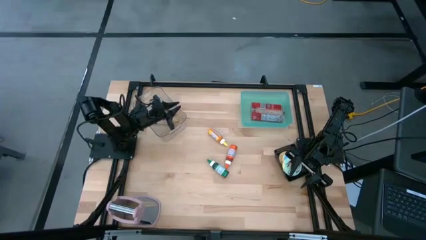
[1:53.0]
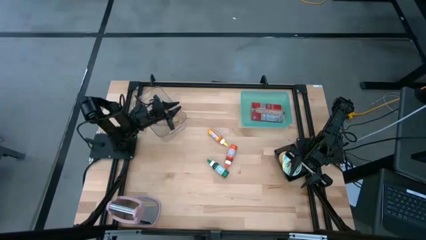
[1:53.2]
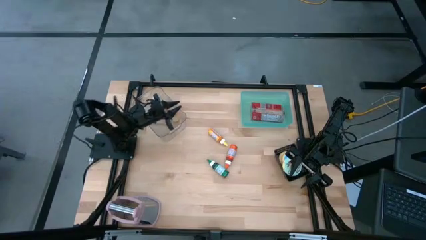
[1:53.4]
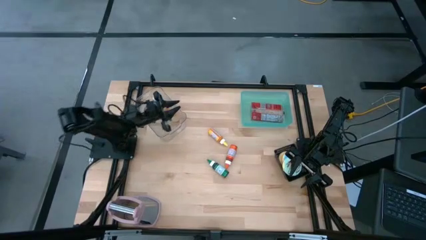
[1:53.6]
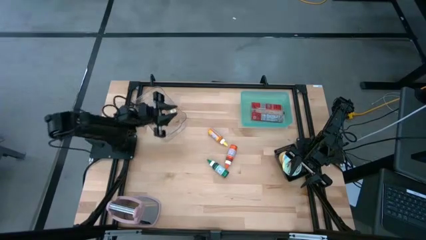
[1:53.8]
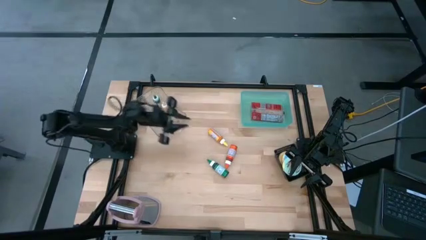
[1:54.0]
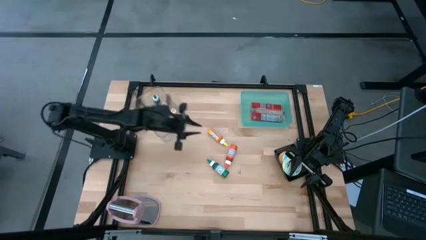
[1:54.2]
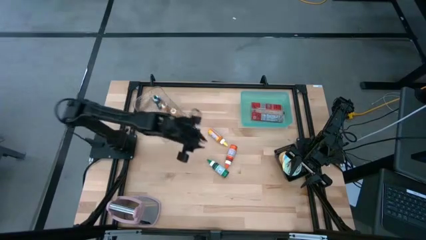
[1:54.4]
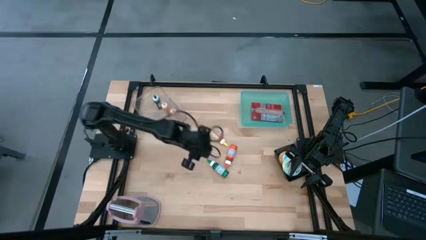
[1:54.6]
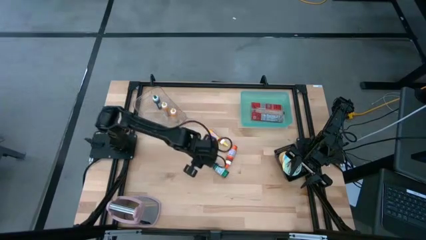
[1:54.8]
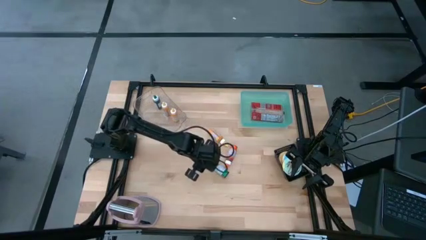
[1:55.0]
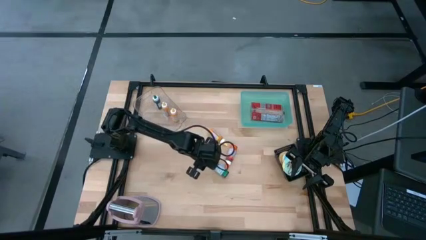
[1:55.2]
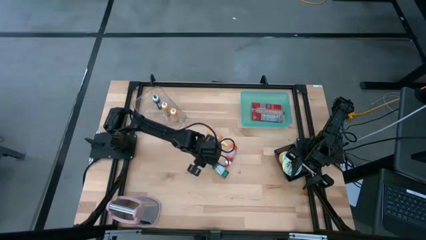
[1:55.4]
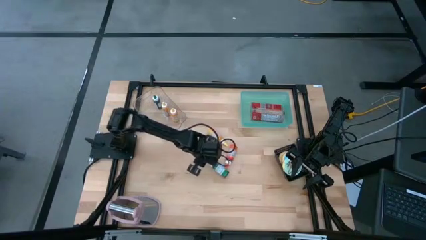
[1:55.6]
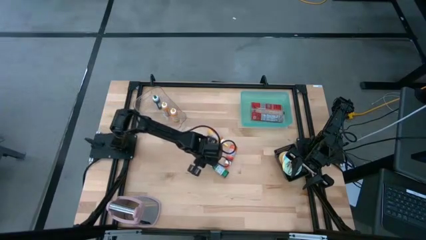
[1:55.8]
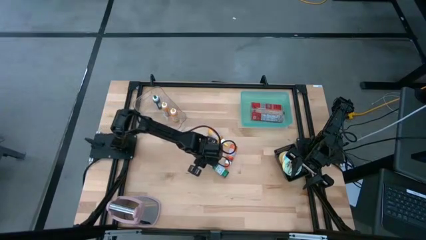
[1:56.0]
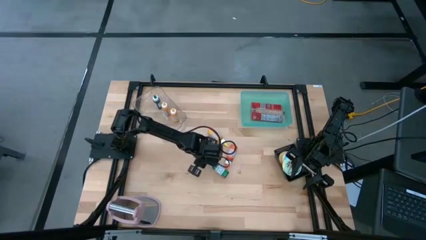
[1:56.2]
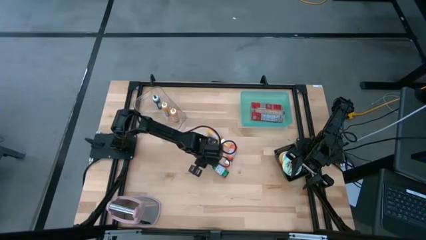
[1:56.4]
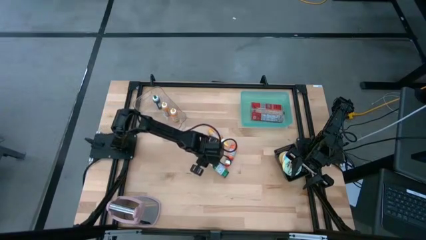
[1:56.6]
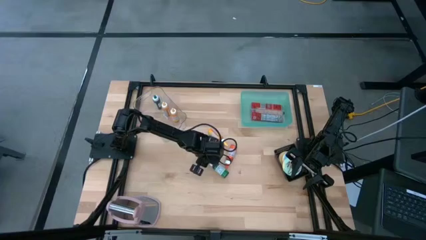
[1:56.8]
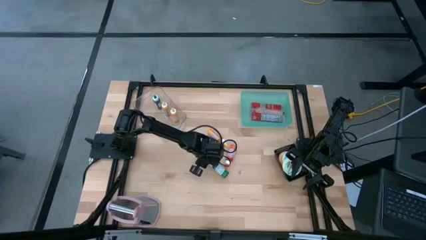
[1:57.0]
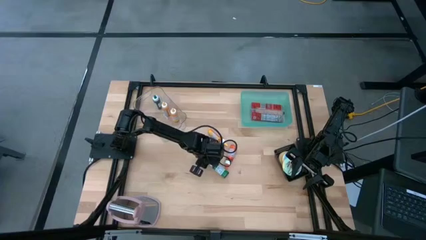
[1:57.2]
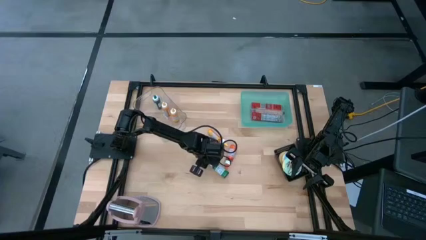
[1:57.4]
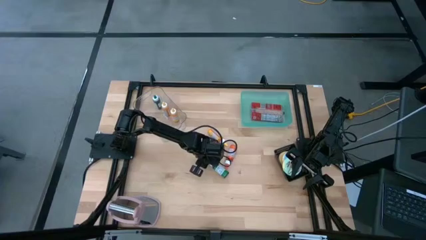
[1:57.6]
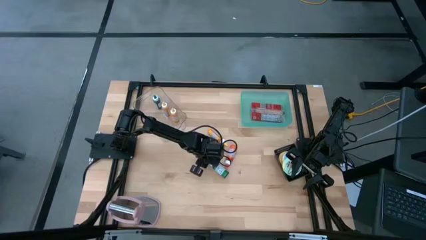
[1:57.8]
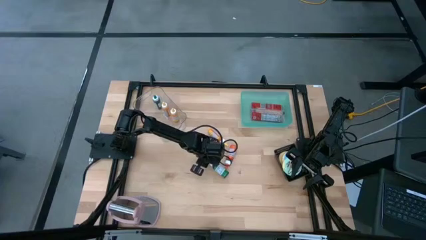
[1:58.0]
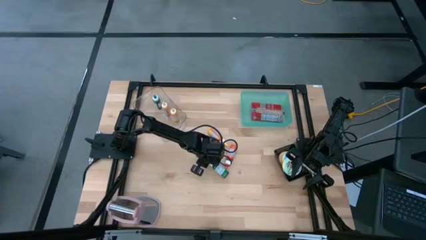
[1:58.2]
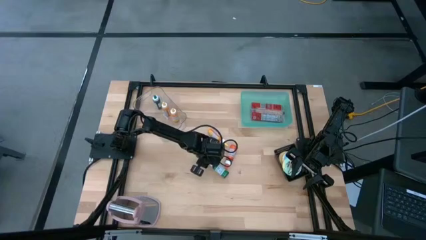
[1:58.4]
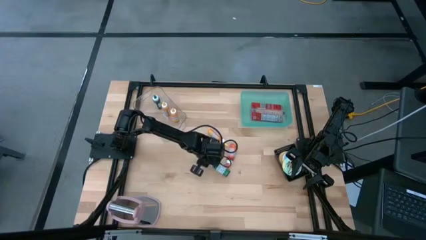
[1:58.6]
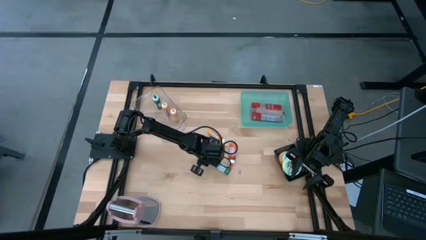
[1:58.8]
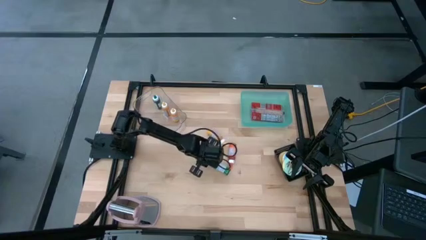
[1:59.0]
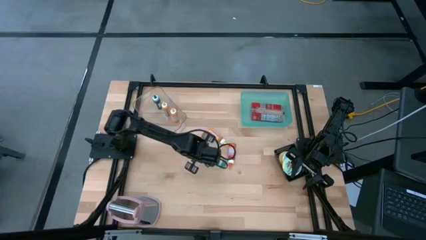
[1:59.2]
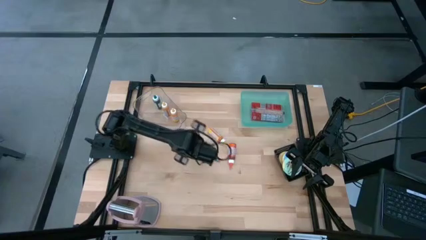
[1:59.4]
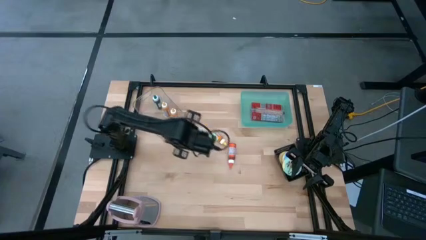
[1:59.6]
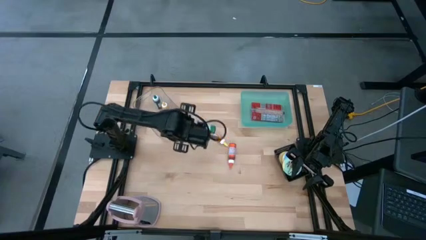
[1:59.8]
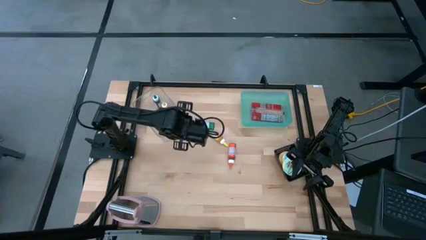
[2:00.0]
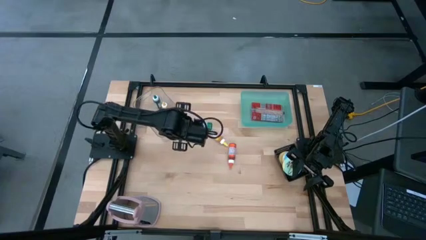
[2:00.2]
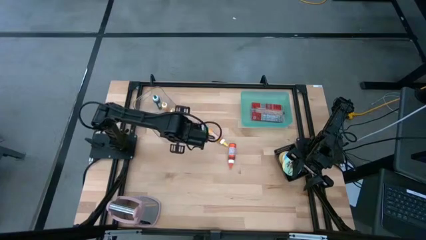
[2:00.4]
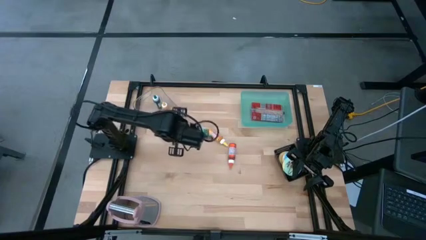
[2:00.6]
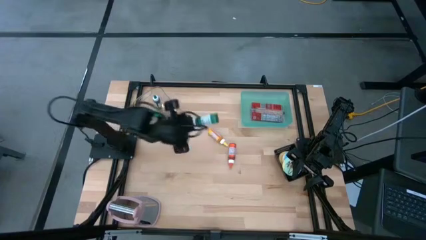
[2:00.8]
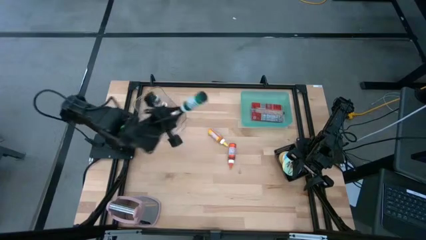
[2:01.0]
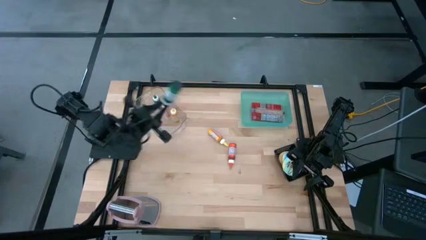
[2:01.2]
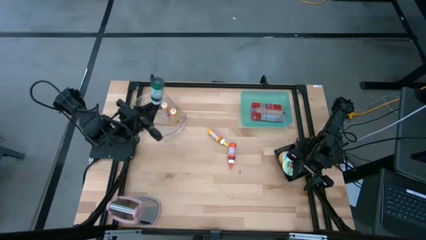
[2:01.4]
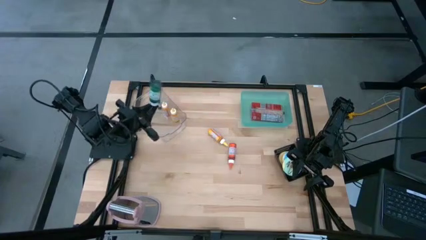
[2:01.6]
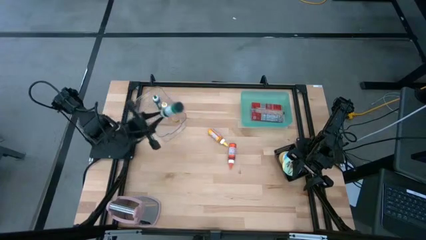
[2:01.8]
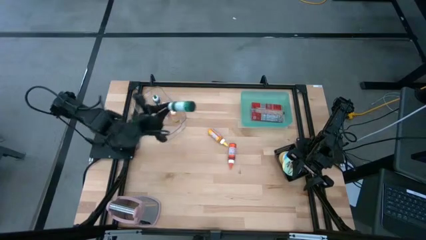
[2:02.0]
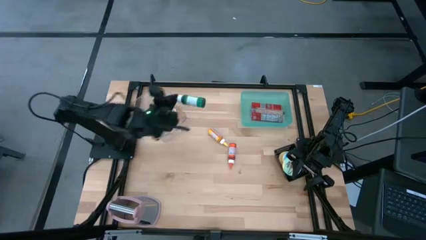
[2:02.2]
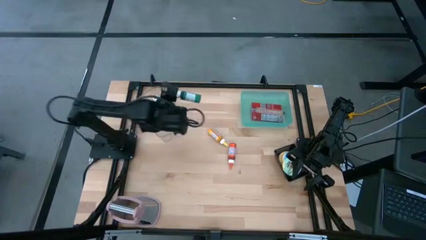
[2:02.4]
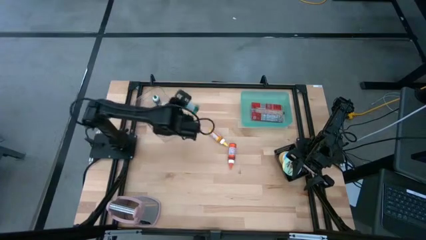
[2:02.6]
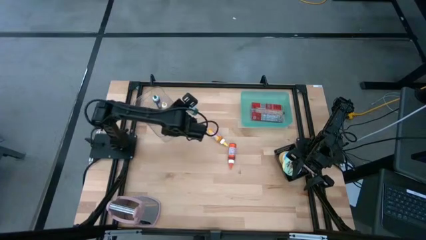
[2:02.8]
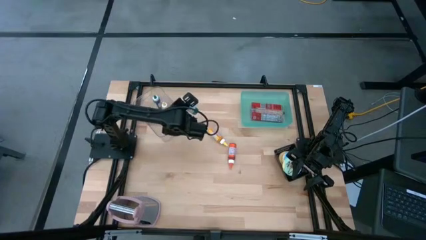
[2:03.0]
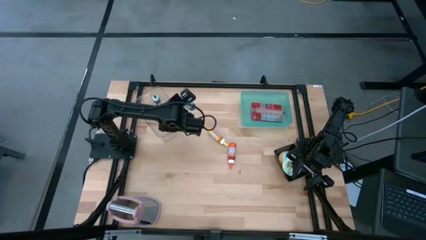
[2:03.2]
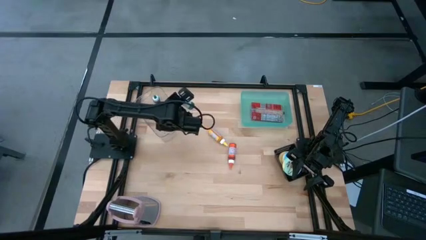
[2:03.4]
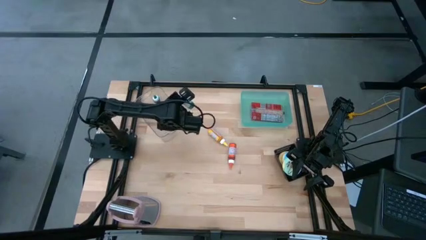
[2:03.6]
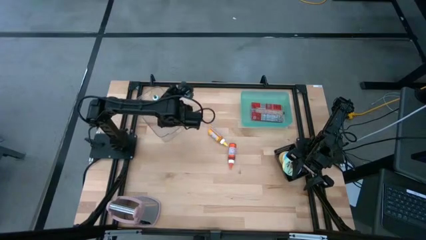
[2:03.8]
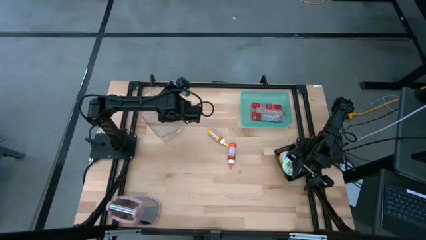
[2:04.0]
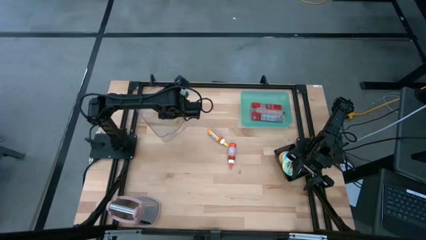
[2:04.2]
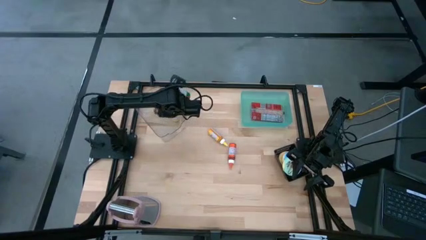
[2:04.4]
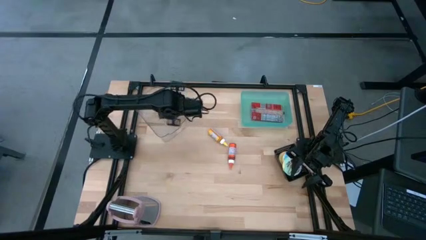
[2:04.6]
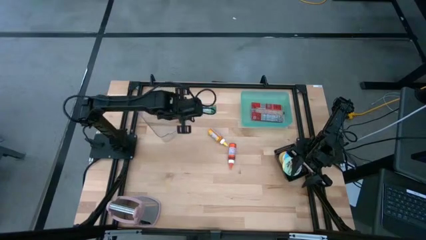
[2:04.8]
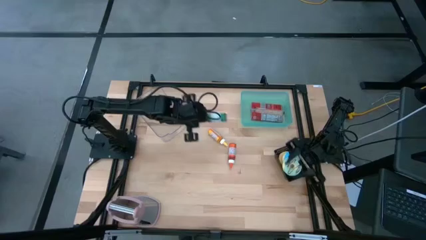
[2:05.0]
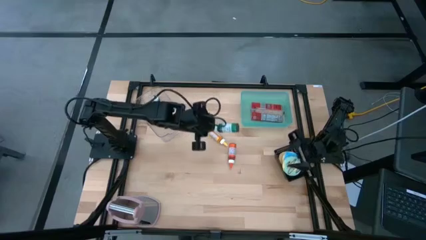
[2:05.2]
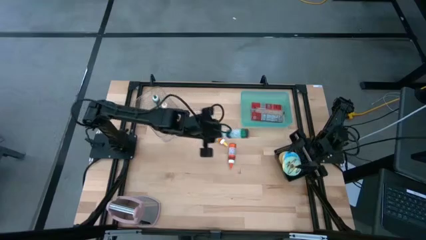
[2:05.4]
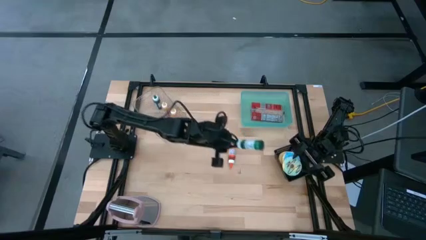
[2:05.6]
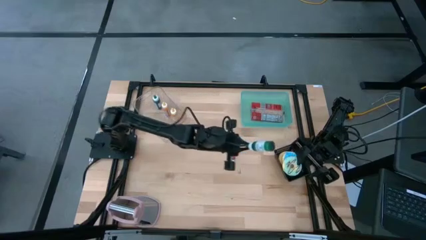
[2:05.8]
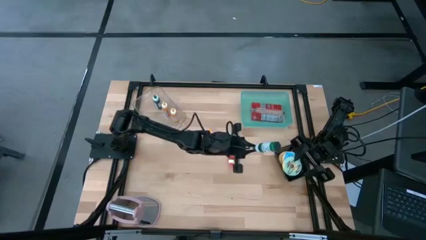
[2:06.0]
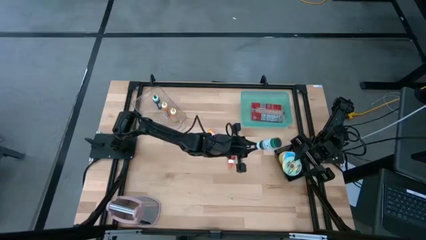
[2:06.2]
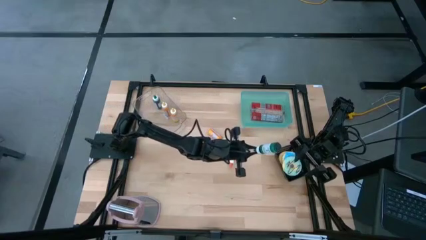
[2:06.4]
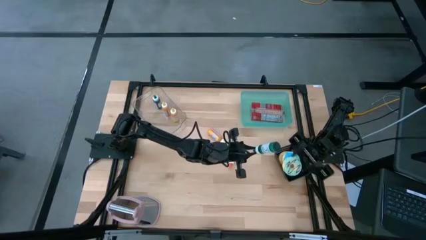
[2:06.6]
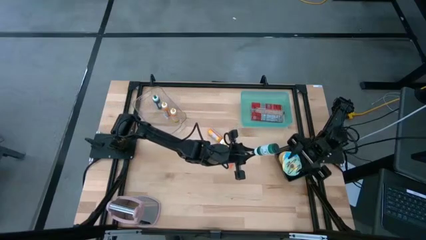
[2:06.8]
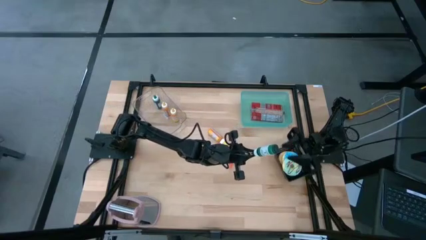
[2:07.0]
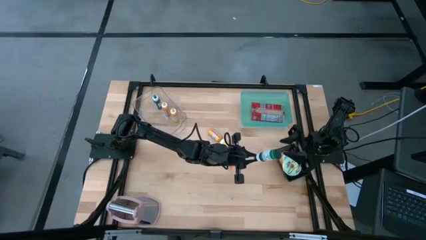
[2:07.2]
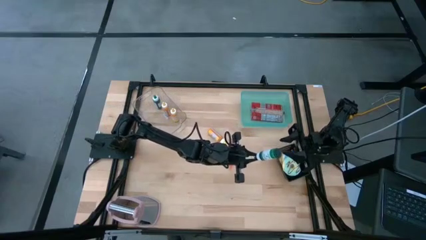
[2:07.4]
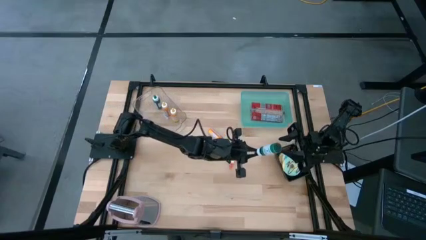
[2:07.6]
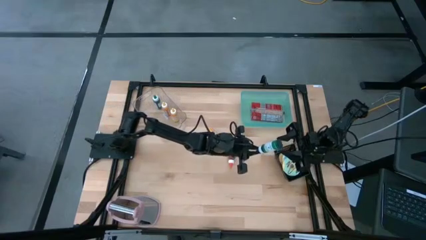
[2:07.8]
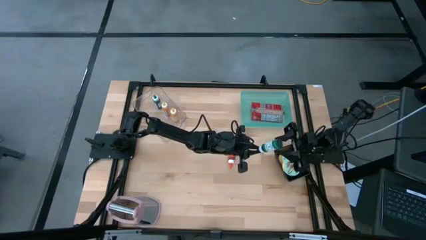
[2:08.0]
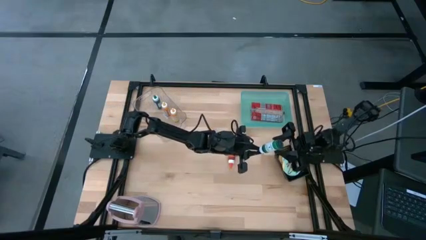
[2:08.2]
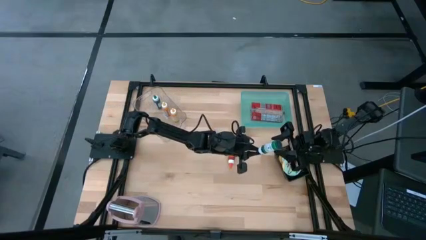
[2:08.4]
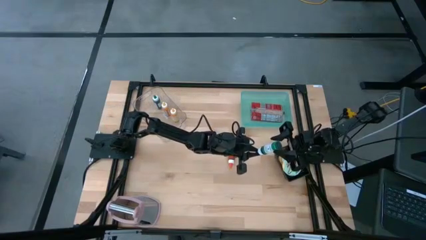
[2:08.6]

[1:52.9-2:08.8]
Put the green food coloring bottle into the transparent bin
